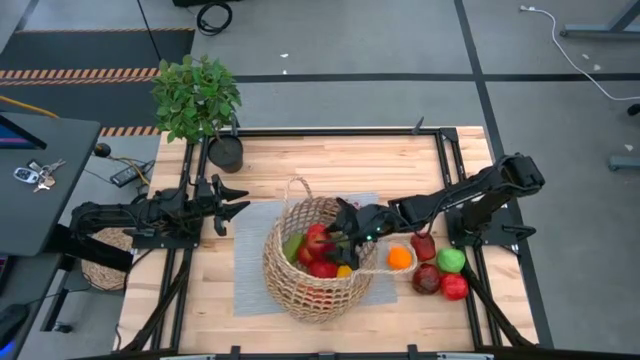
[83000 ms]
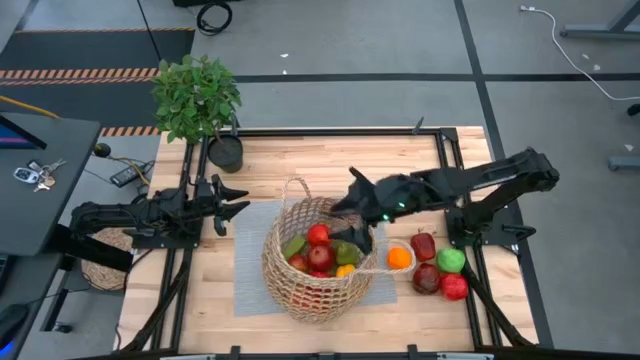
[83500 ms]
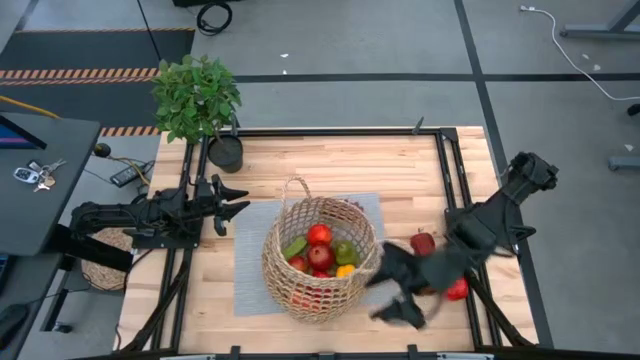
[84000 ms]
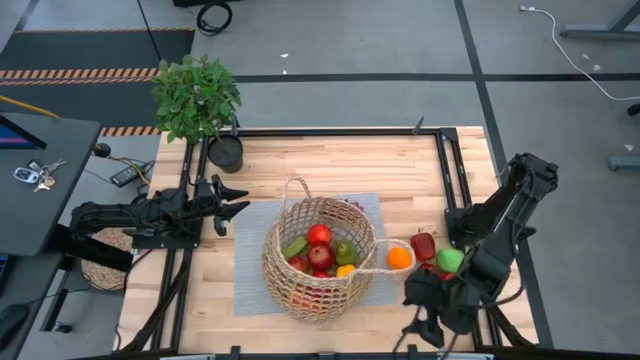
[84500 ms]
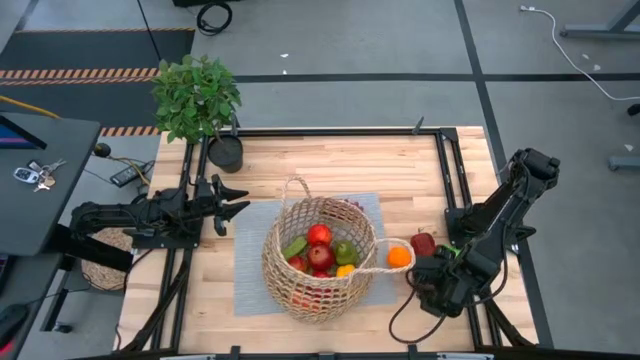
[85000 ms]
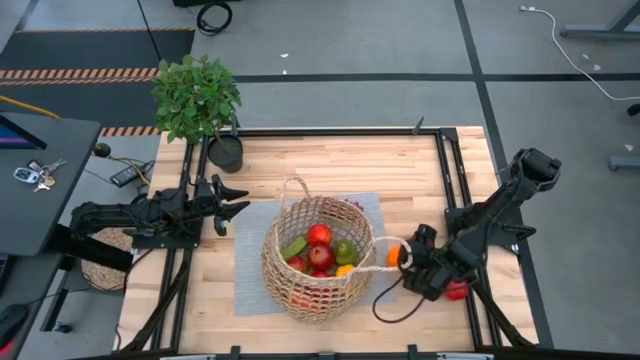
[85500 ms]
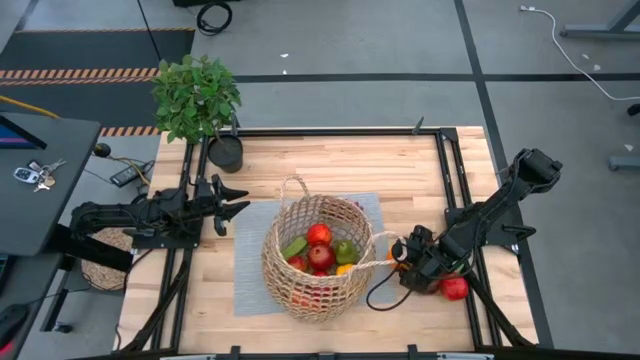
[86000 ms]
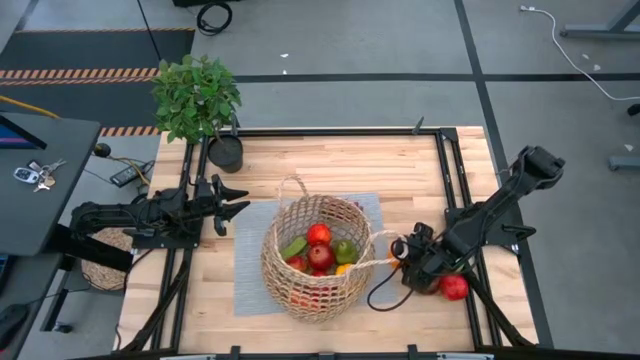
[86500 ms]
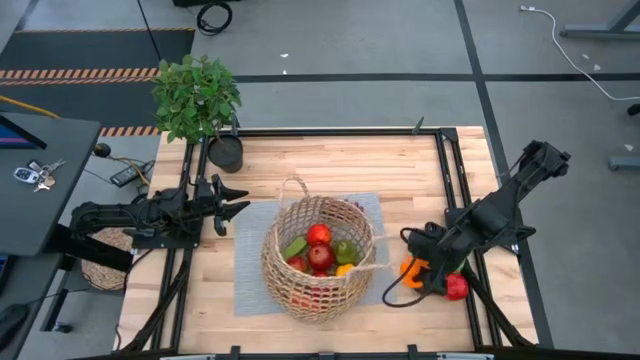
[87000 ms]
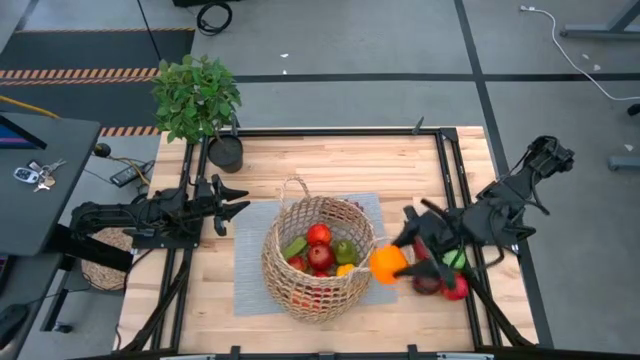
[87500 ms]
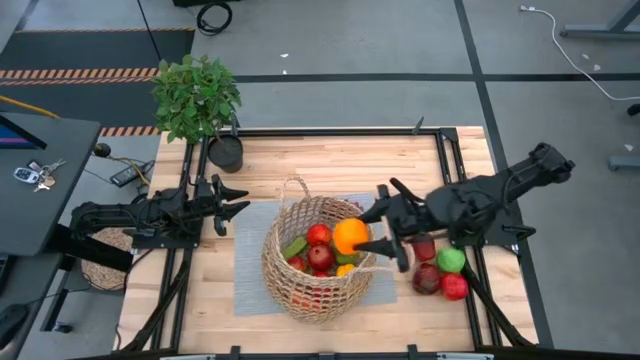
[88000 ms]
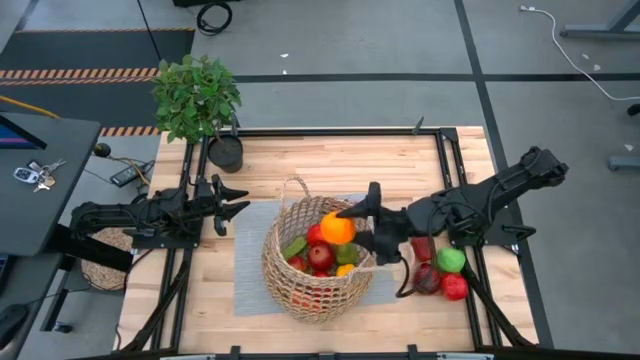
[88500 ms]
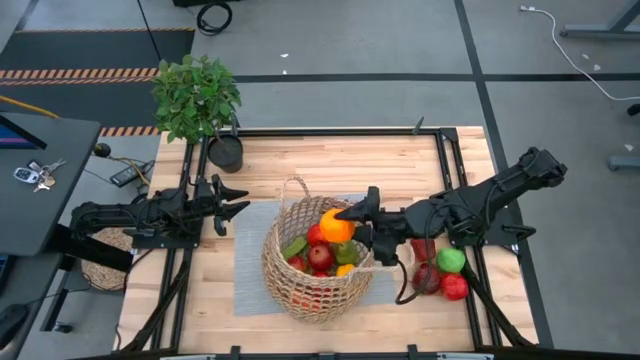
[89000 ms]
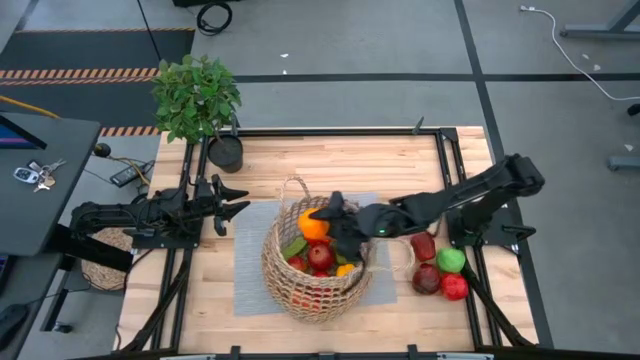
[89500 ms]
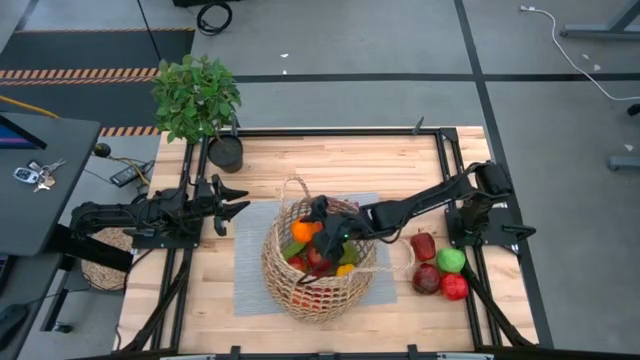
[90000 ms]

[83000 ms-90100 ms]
Task: Build produce basket
Put the orange into the basket

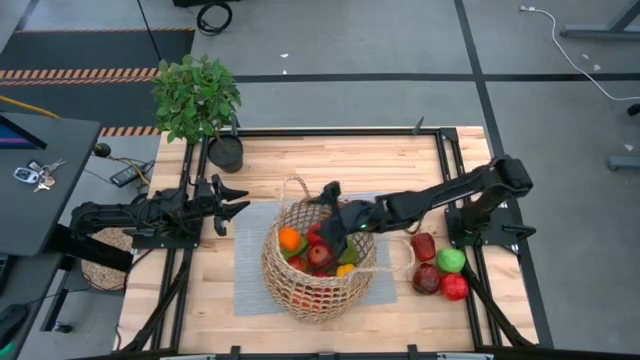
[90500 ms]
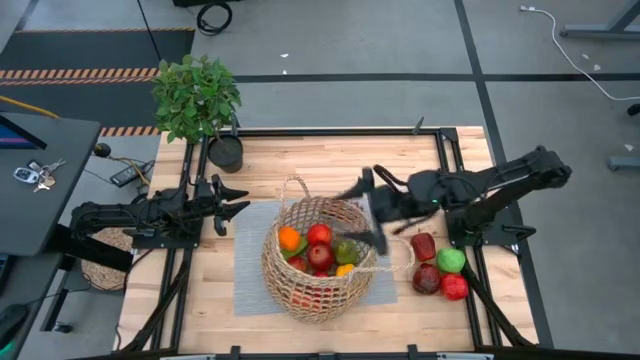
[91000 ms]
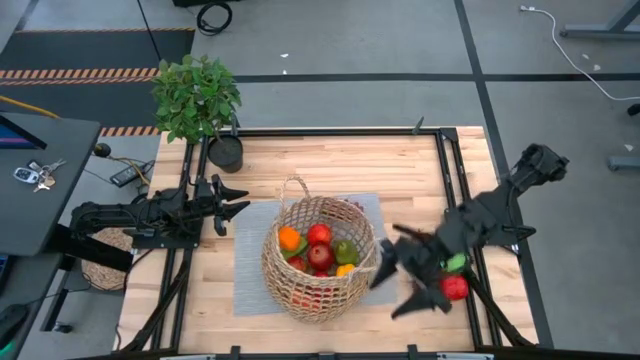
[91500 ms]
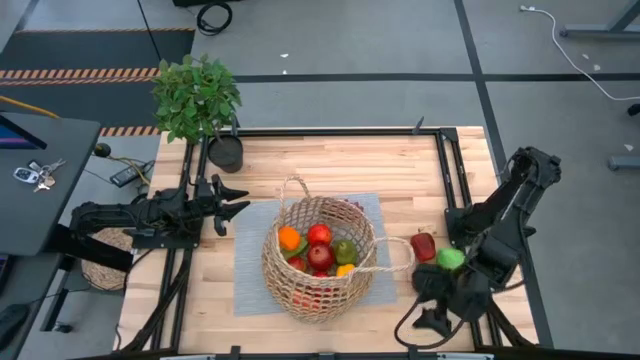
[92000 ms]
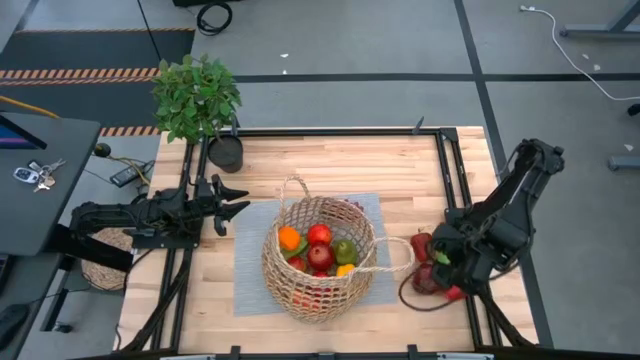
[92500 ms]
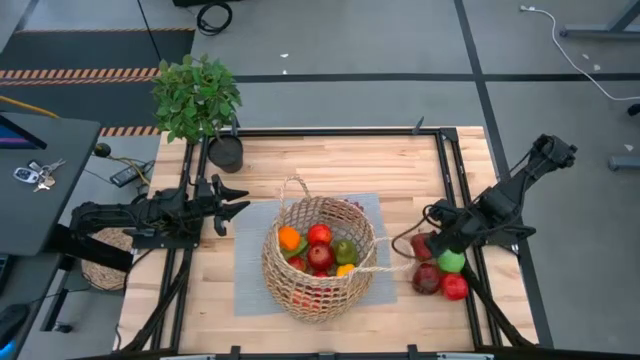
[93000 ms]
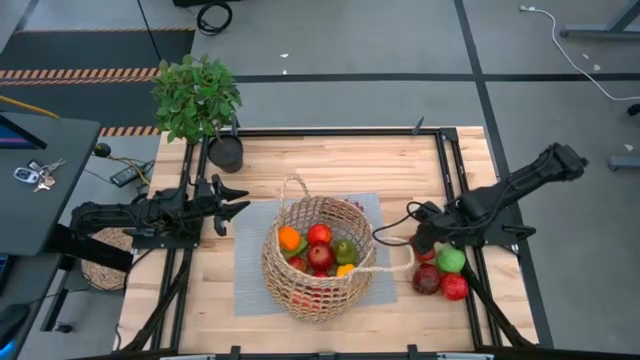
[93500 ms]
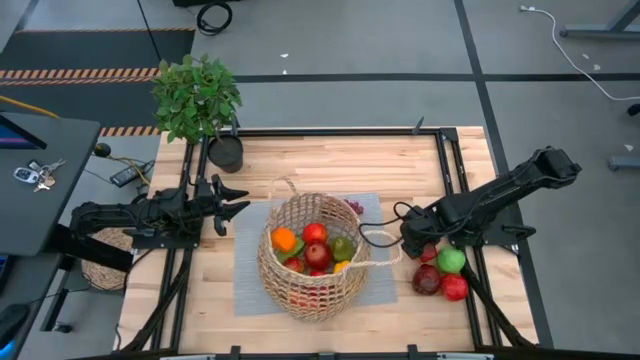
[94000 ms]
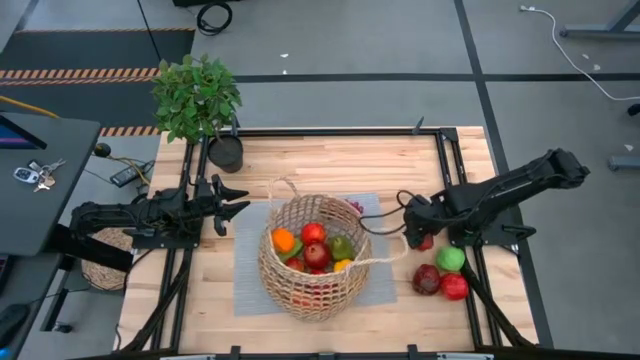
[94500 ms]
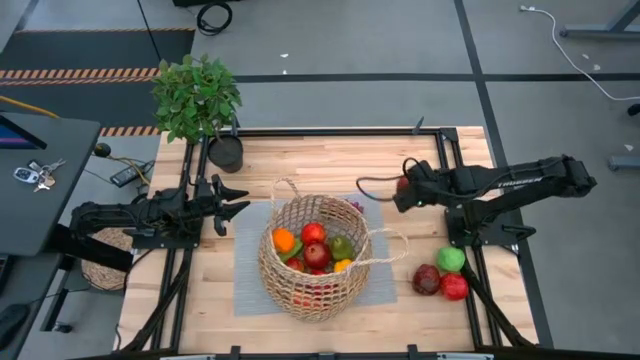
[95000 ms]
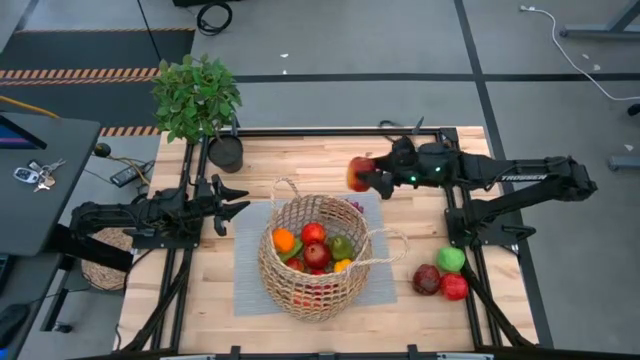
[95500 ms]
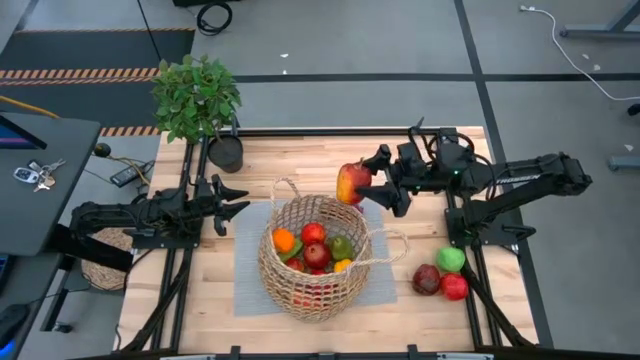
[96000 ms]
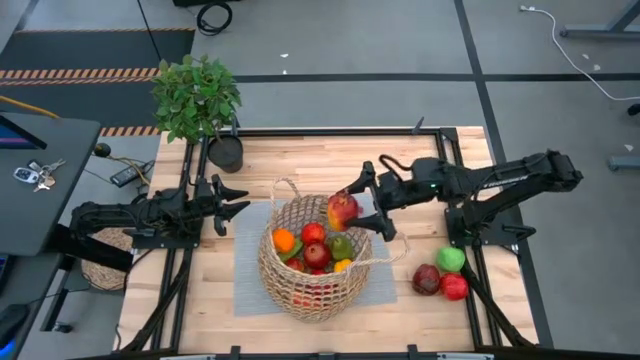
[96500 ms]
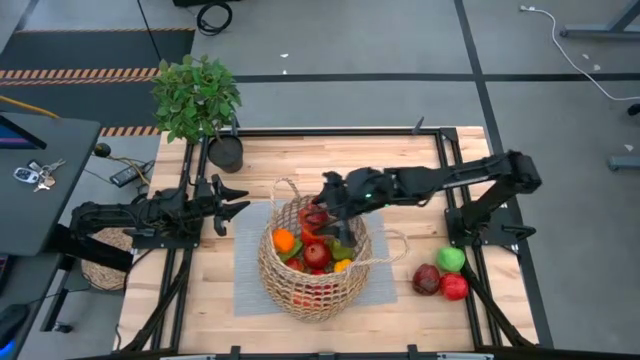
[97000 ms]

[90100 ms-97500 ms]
Put the dark red apple into the basket

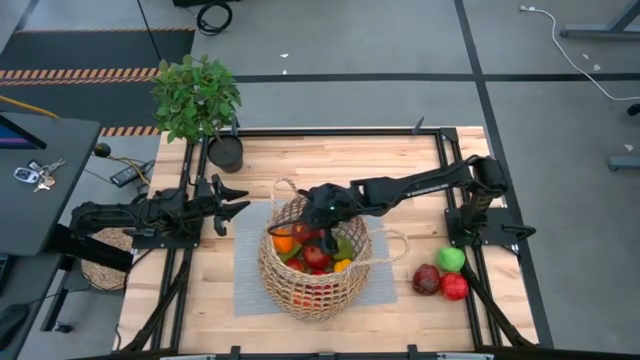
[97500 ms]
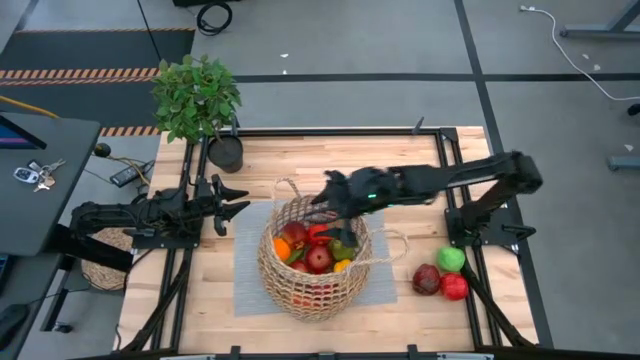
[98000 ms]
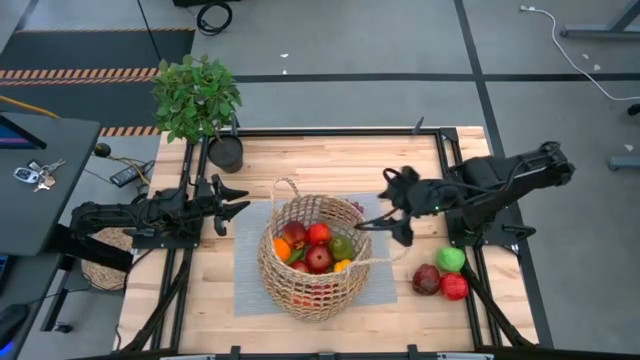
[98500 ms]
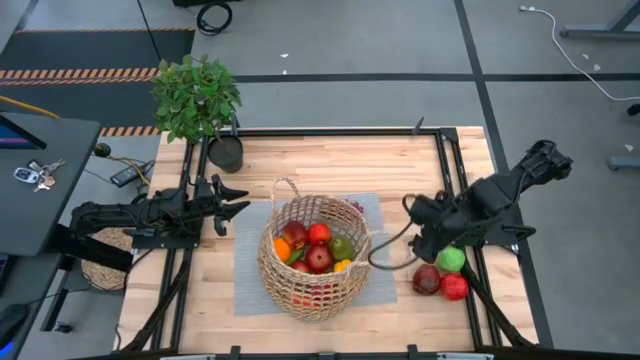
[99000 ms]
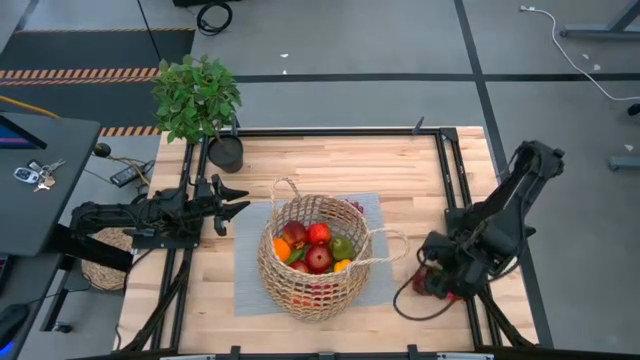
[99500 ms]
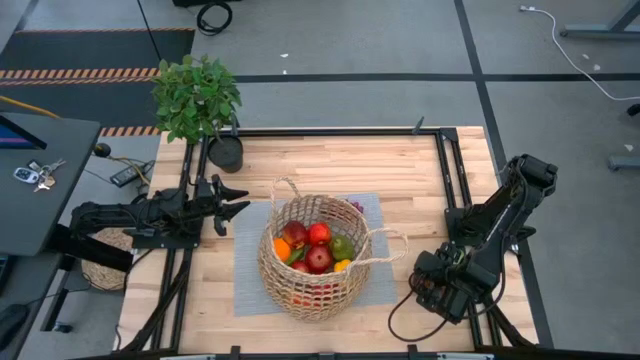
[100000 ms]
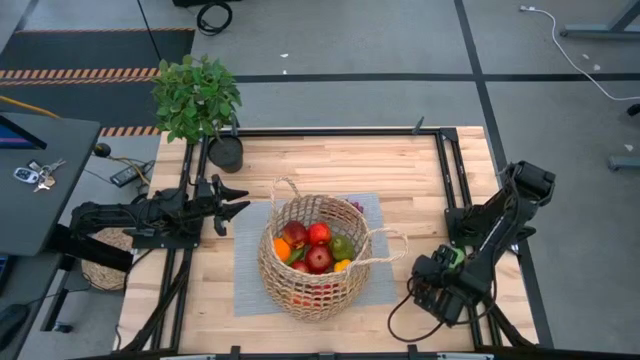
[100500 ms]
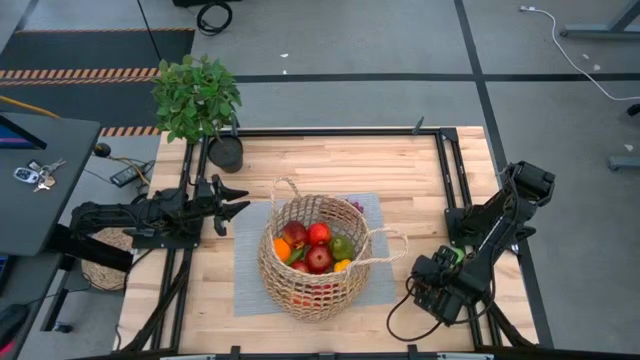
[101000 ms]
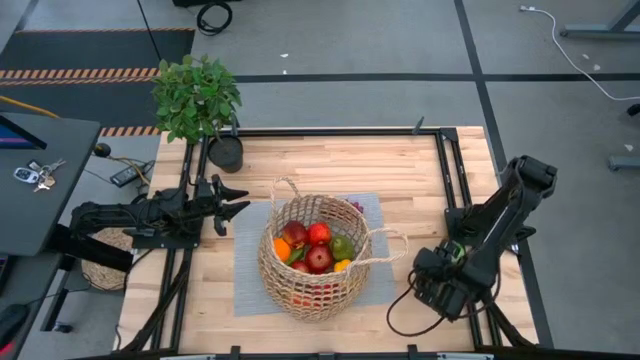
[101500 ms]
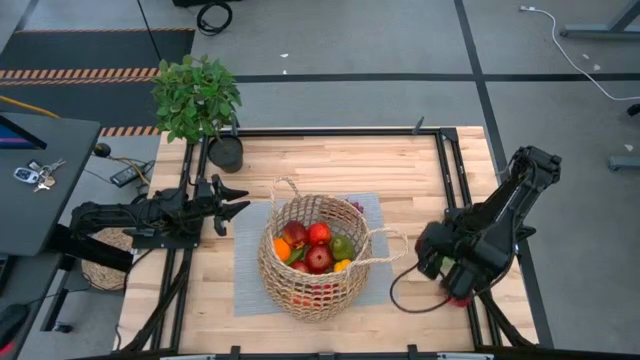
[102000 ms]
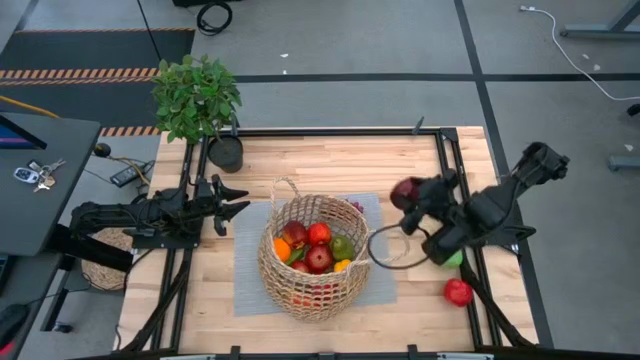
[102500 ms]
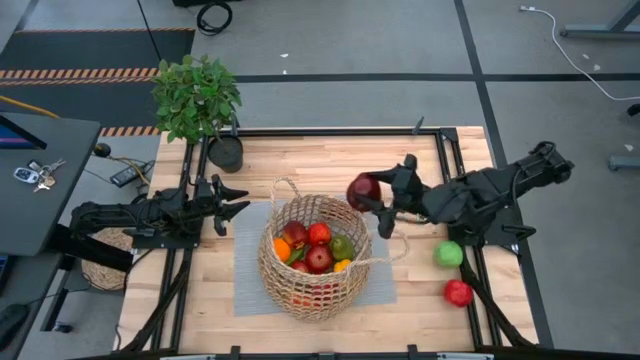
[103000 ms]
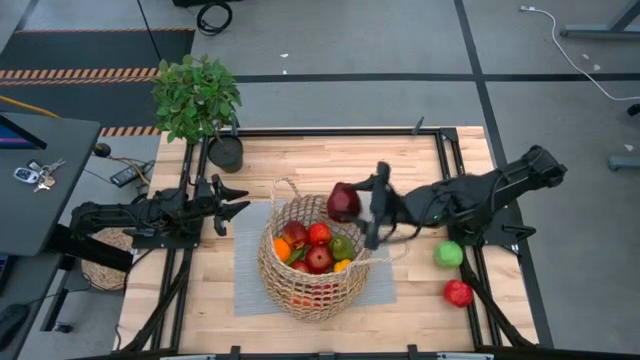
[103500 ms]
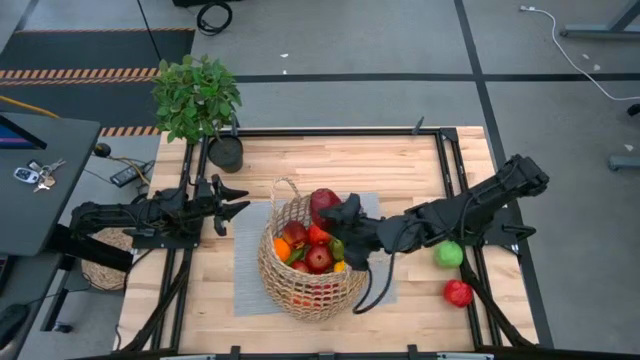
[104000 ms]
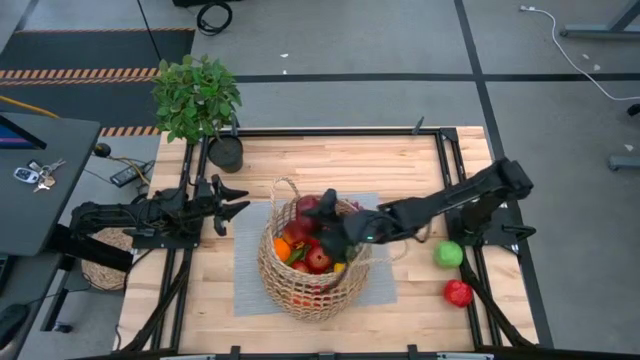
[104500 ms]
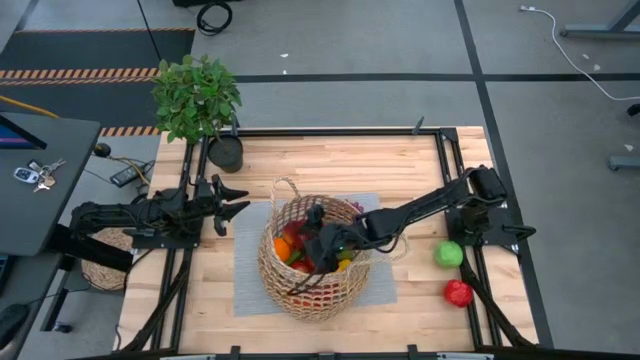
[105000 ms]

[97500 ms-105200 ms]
Put the dark red apple into the basket
